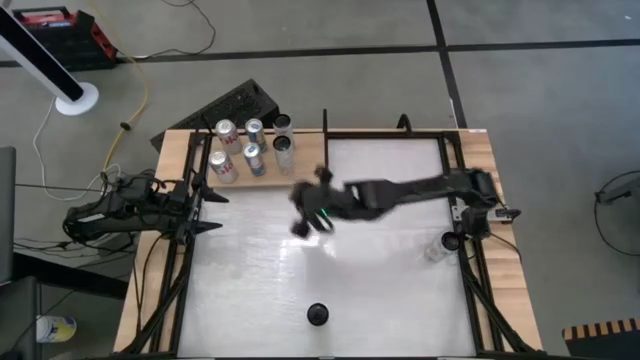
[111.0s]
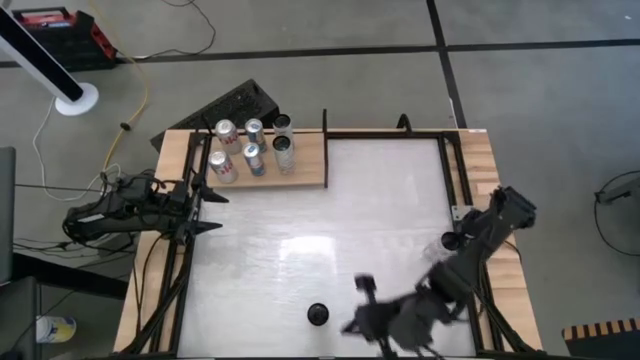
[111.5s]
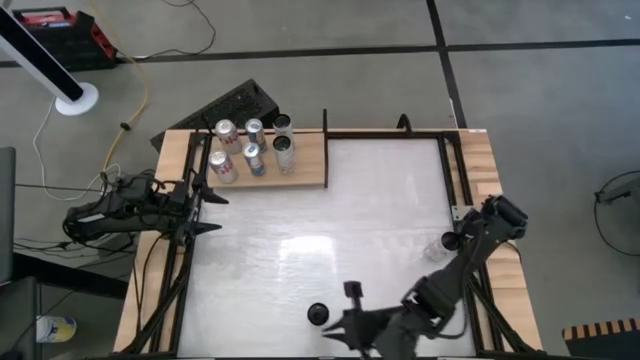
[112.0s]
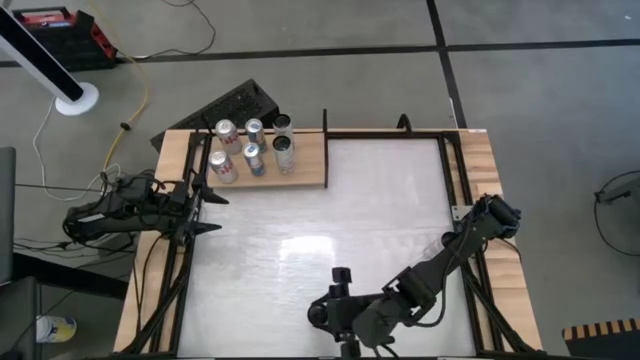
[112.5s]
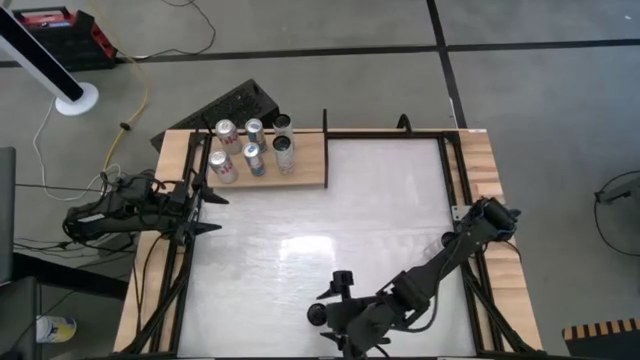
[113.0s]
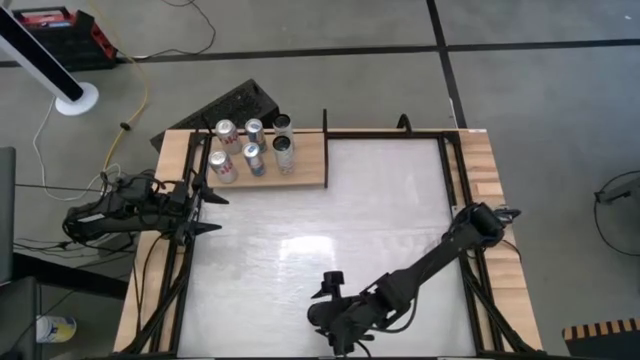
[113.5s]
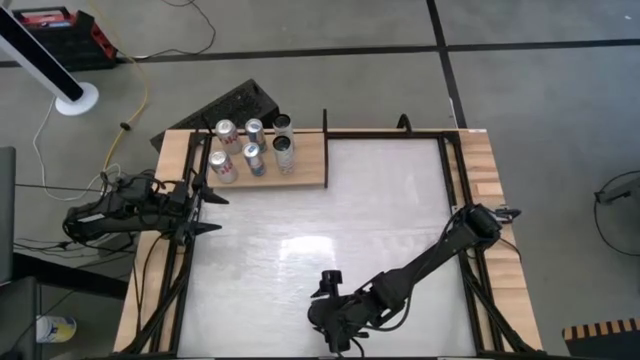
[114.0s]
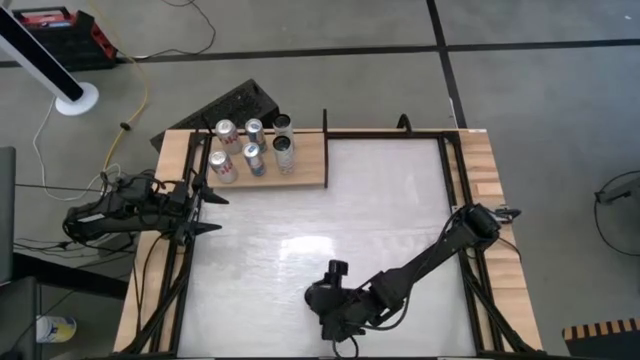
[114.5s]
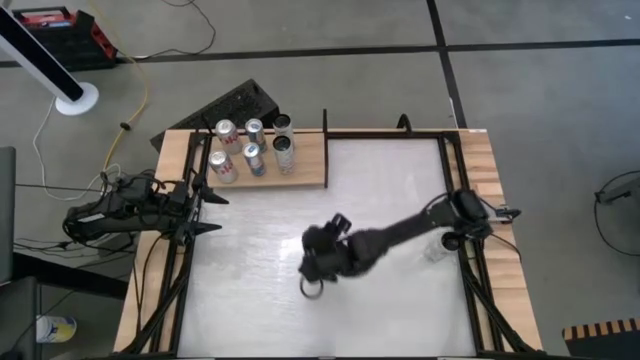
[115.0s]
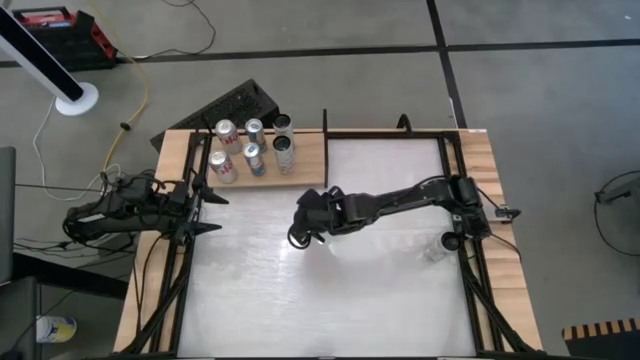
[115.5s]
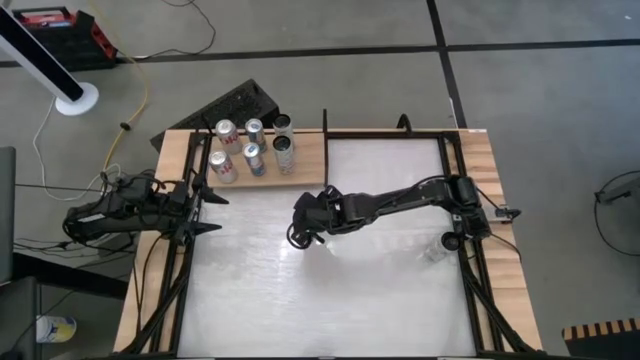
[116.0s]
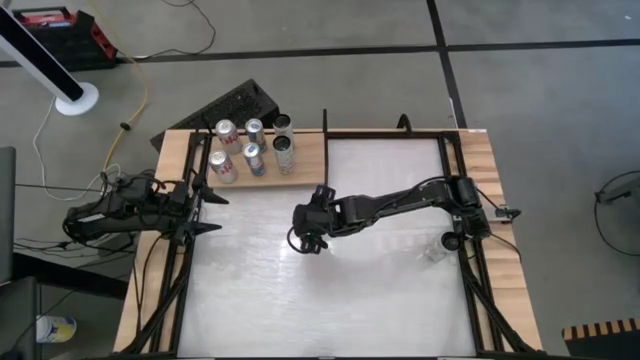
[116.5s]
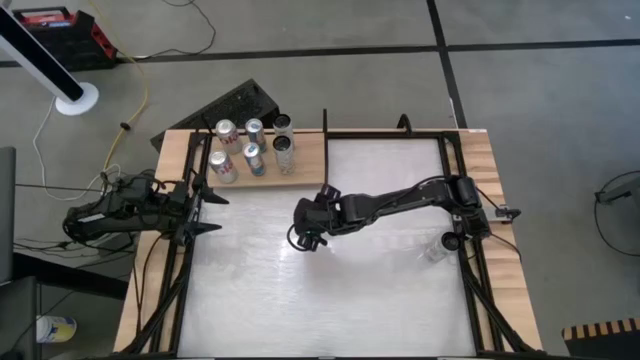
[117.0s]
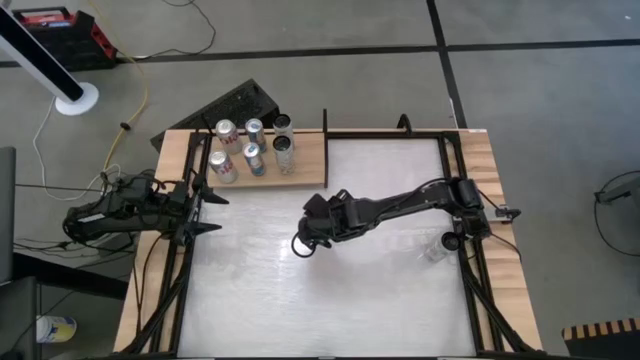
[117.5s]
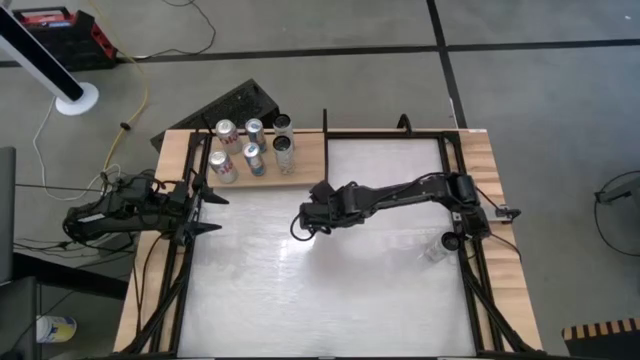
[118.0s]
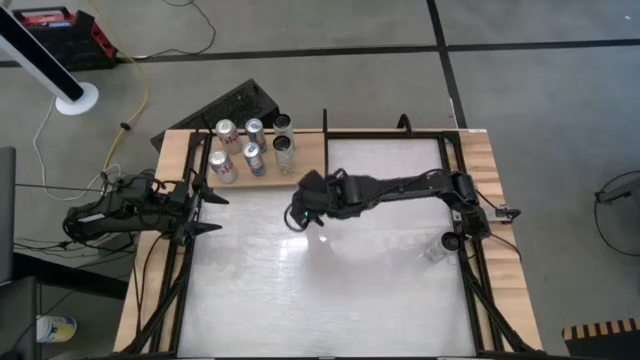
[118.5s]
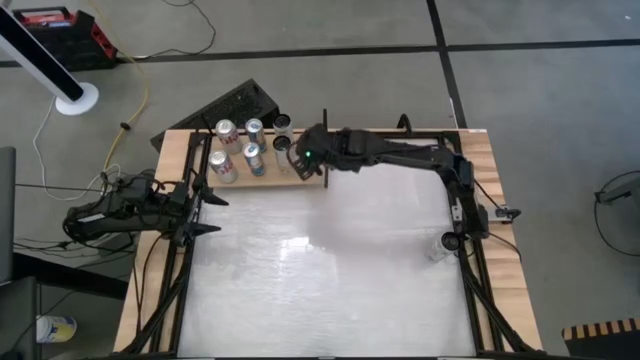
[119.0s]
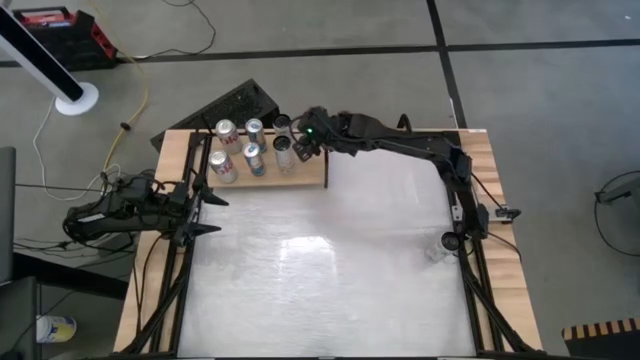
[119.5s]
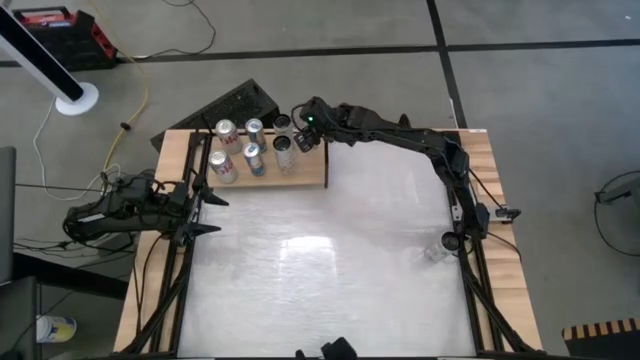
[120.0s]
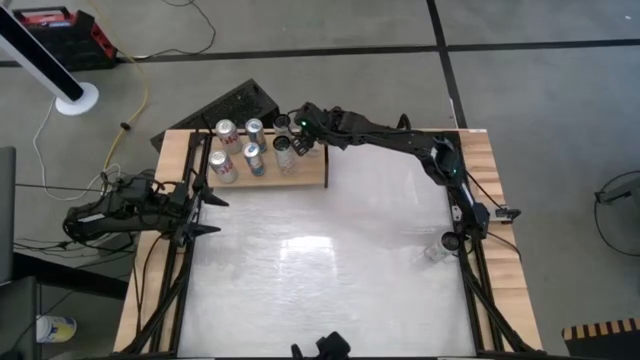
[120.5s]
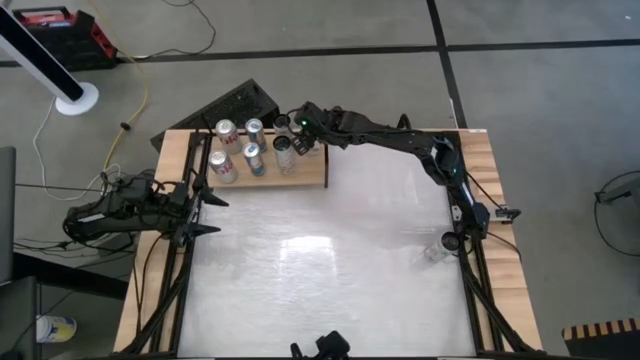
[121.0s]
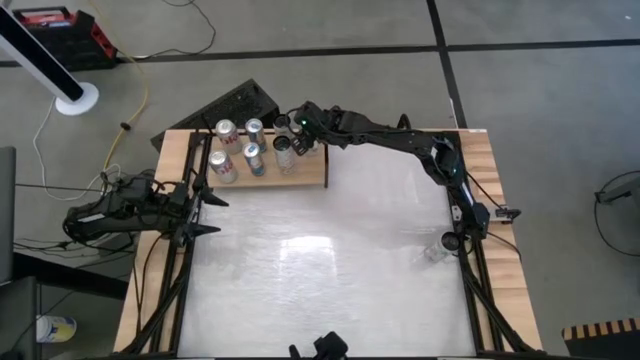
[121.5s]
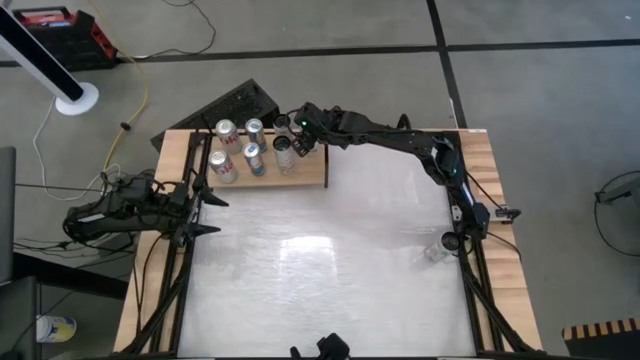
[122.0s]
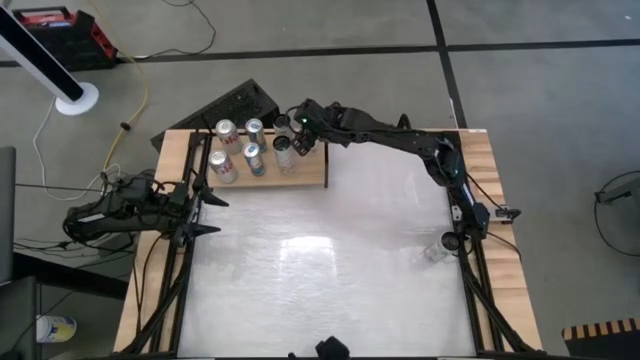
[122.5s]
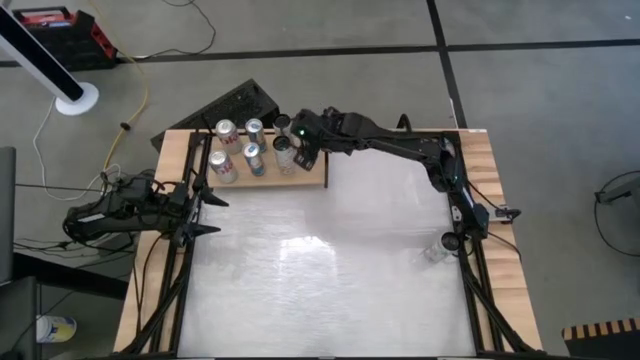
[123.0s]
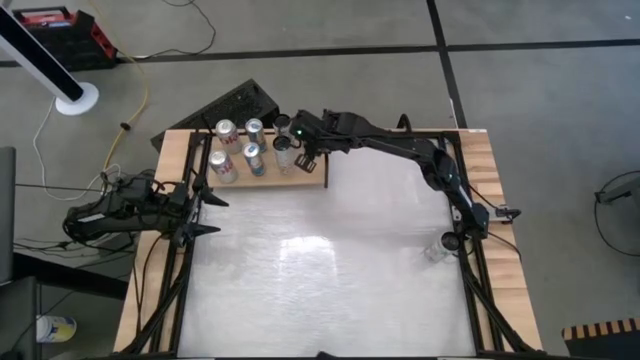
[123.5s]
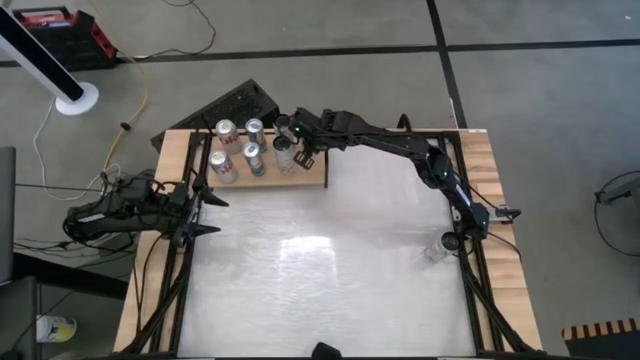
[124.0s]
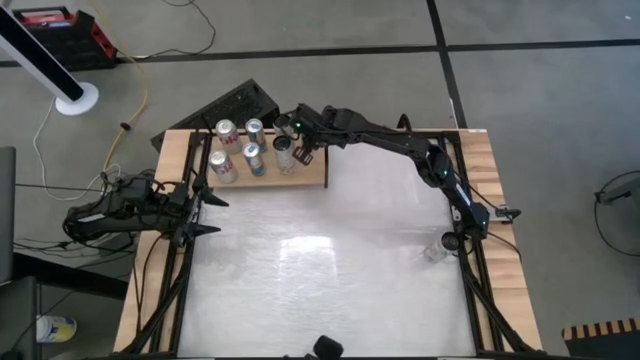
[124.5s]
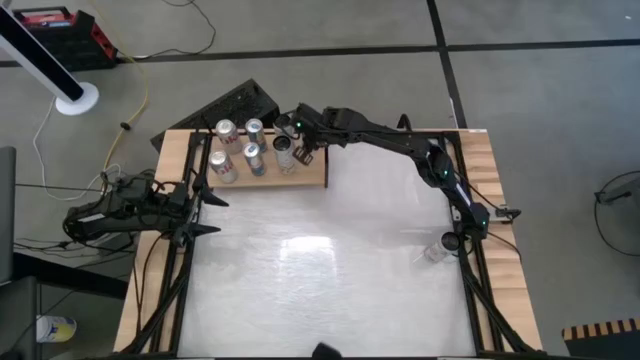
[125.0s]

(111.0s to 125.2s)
Task: Place canned beverage on shelf
Put the bottom white-pink soda can on the shelf

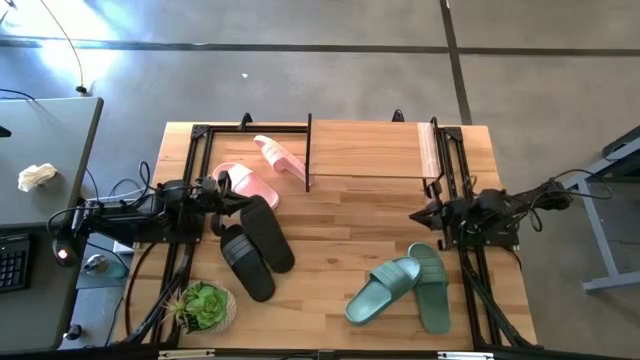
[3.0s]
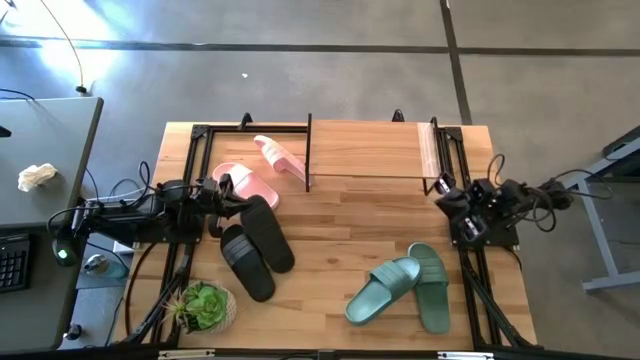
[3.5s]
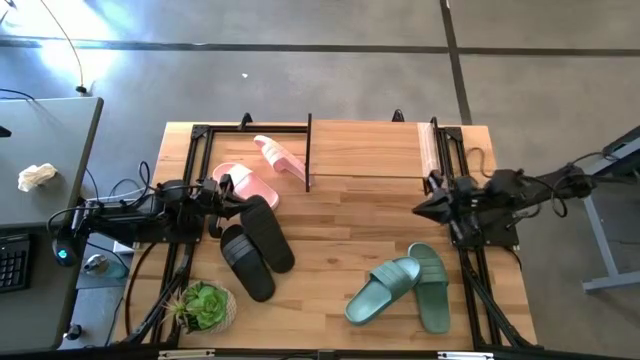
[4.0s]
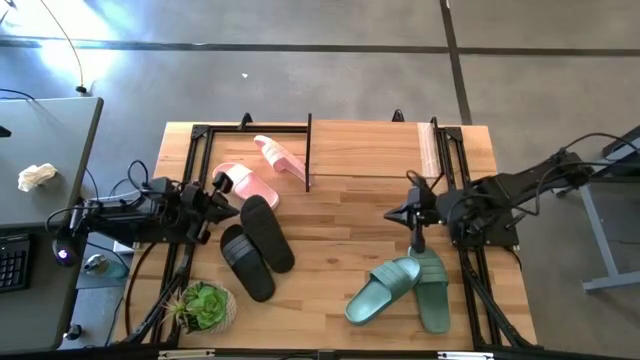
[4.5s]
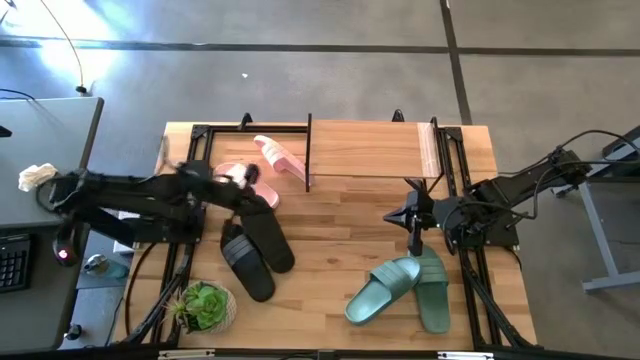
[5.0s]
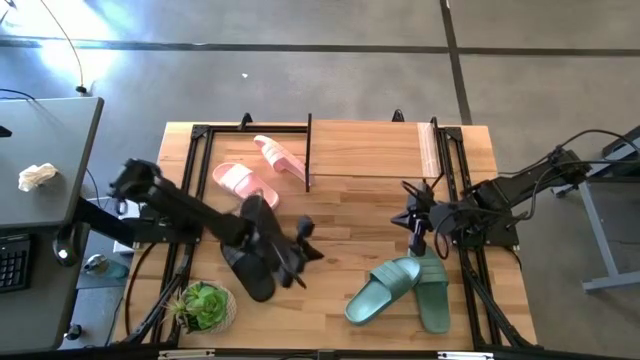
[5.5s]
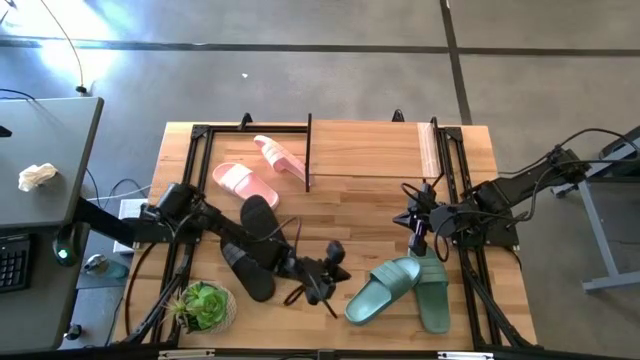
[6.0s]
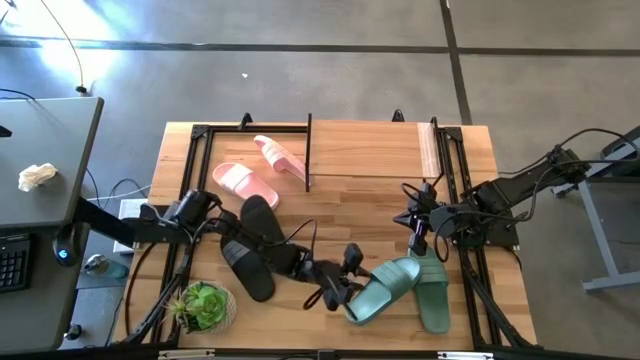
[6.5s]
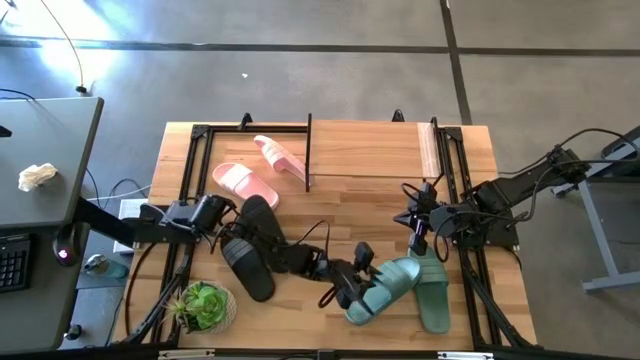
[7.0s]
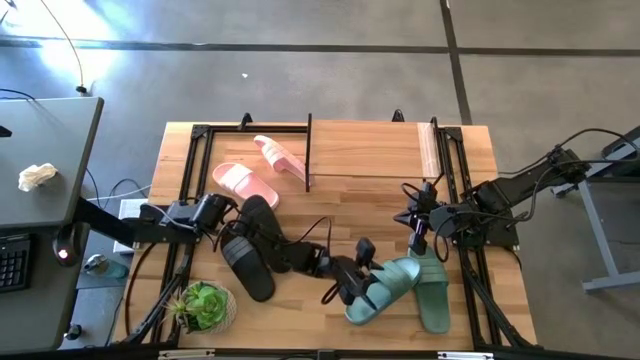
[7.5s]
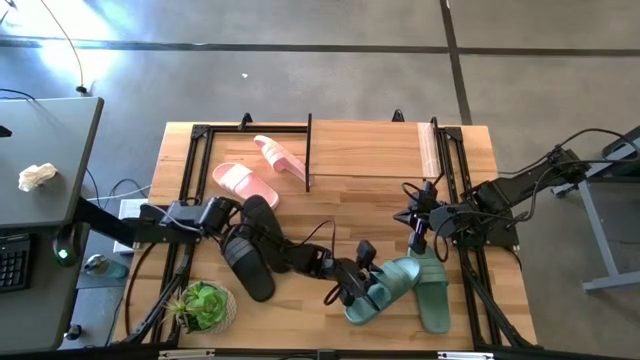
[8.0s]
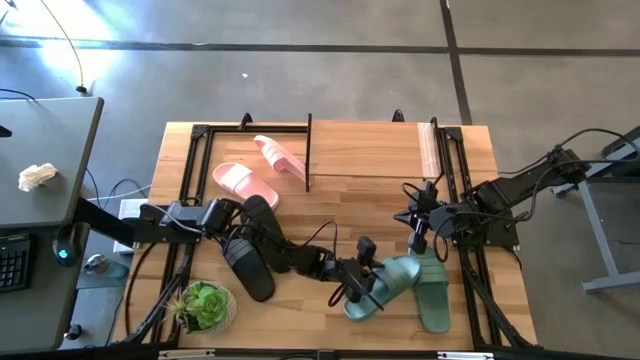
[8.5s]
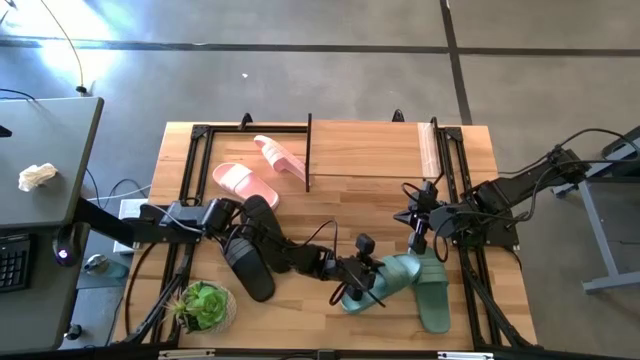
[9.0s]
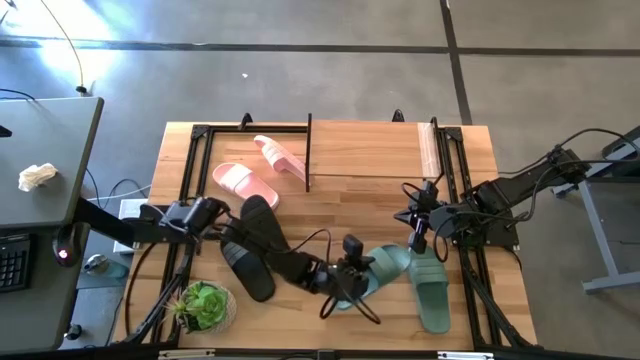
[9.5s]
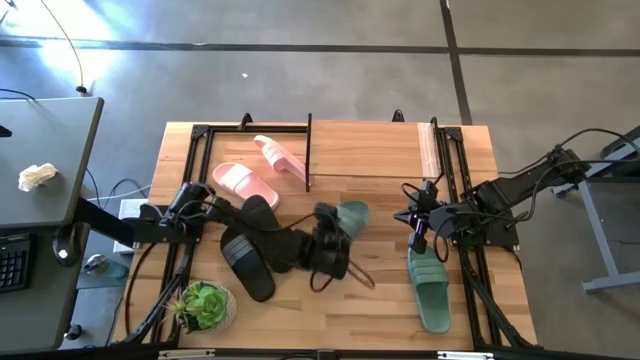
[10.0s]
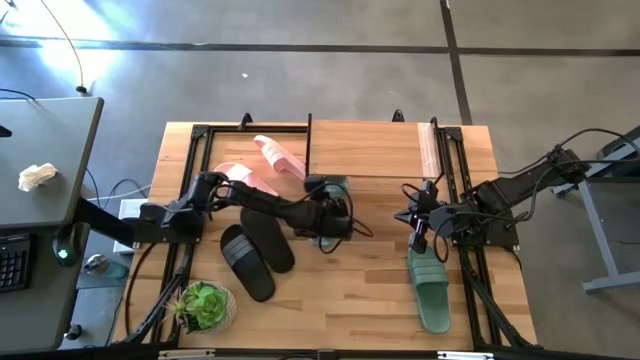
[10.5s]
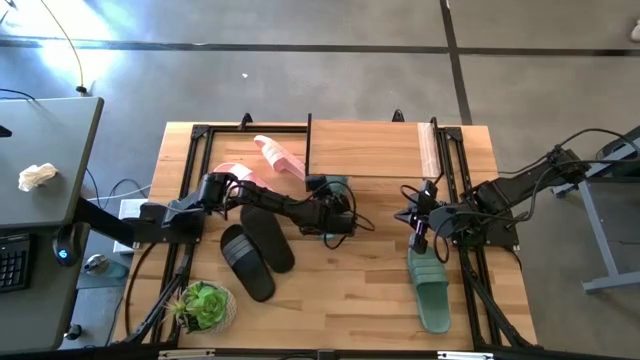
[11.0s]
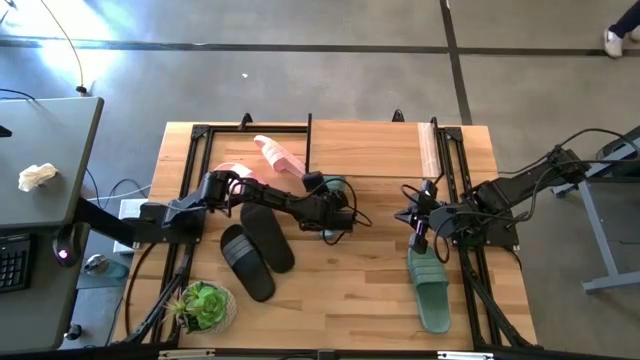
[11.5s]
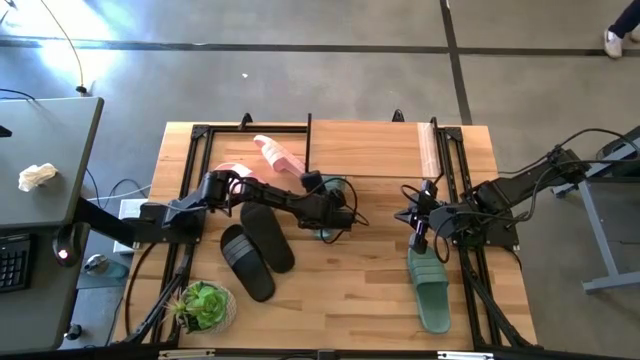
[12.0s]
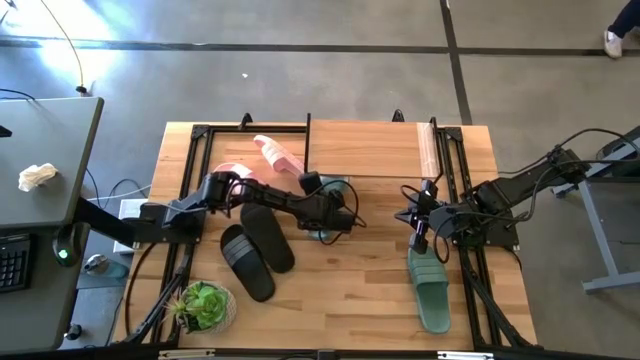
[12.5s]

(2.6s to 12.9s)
Task: Pick and place slides into the shelf
Put the left green slide under the shelf
